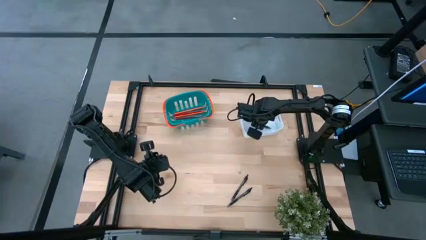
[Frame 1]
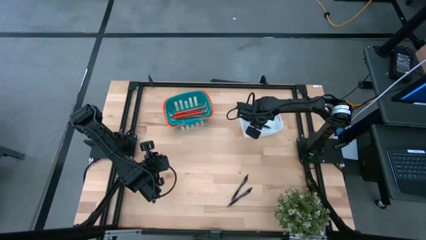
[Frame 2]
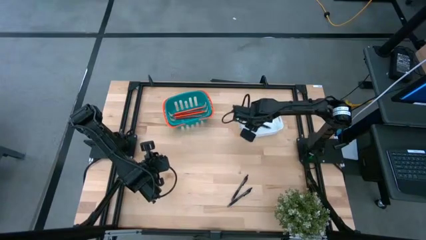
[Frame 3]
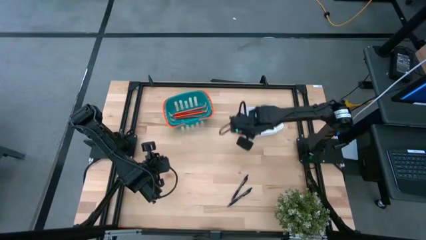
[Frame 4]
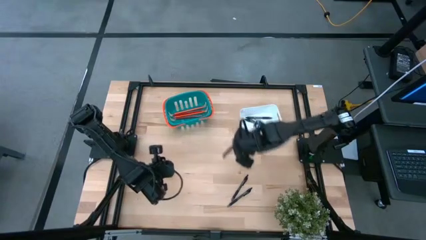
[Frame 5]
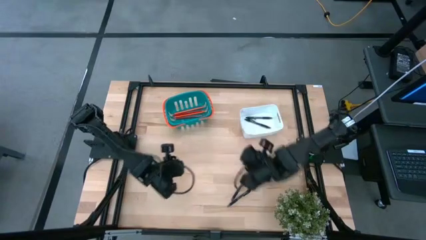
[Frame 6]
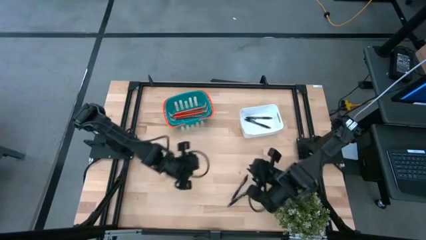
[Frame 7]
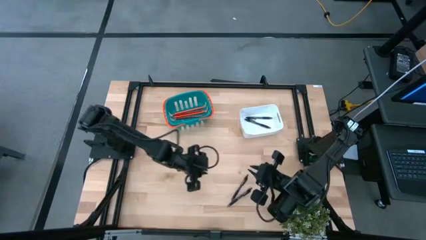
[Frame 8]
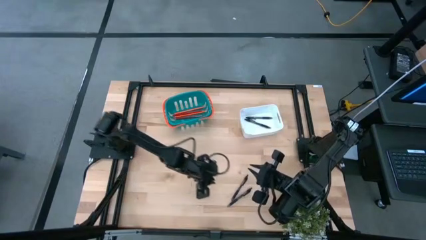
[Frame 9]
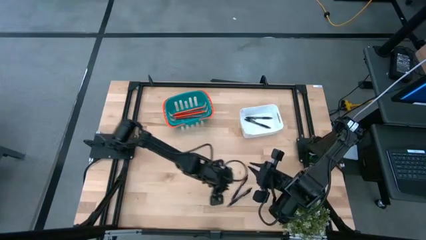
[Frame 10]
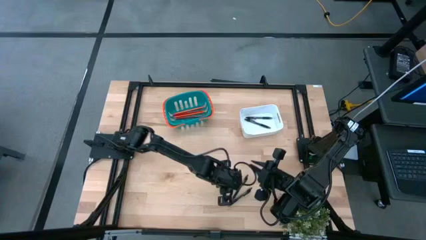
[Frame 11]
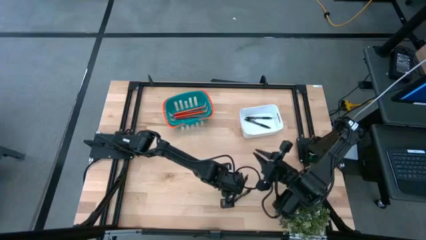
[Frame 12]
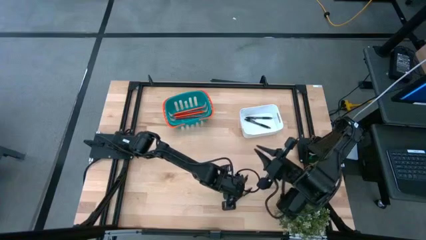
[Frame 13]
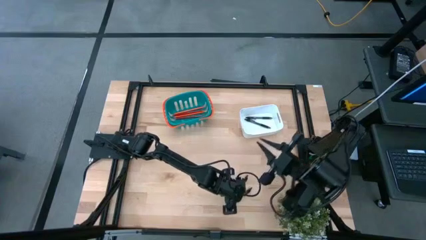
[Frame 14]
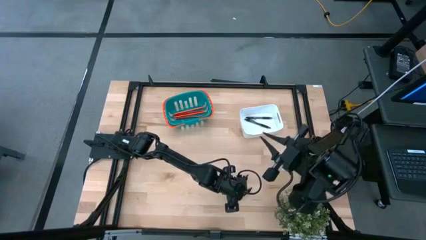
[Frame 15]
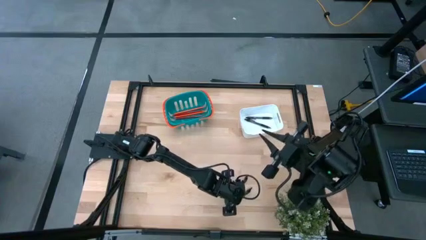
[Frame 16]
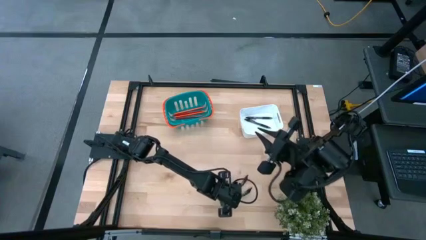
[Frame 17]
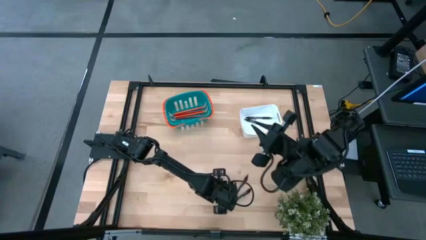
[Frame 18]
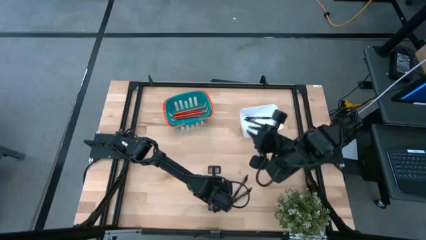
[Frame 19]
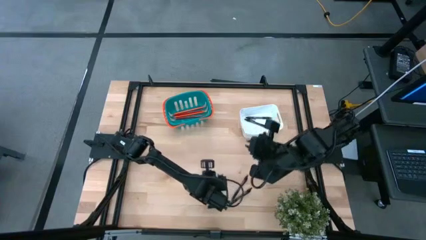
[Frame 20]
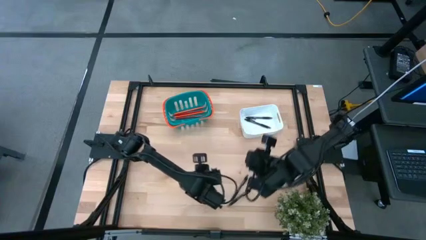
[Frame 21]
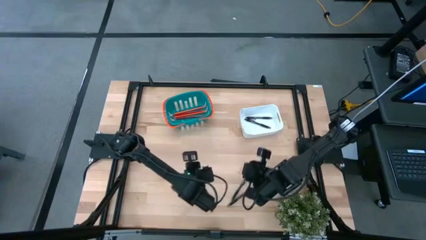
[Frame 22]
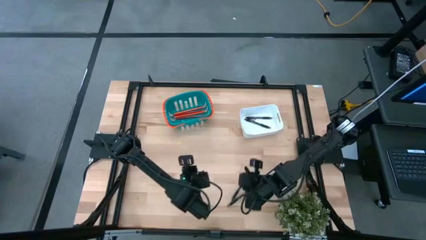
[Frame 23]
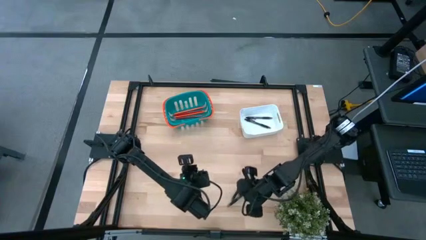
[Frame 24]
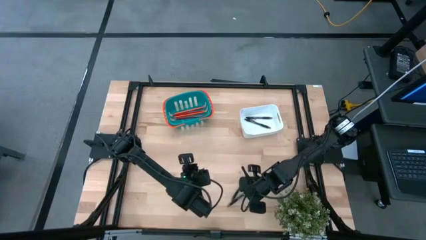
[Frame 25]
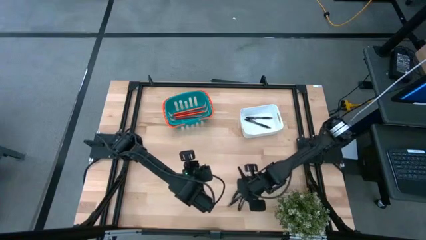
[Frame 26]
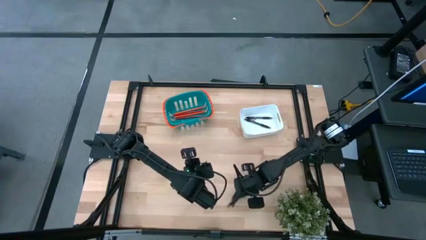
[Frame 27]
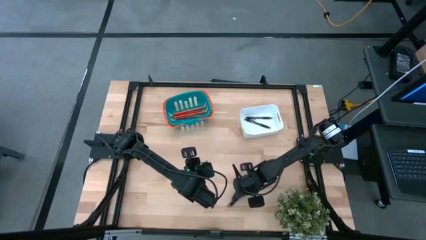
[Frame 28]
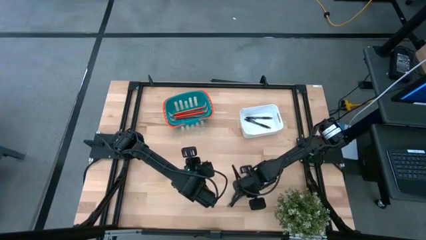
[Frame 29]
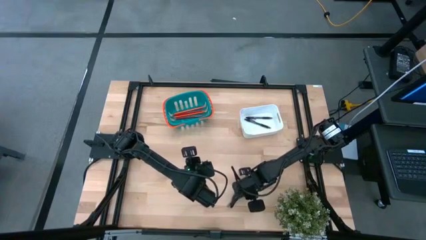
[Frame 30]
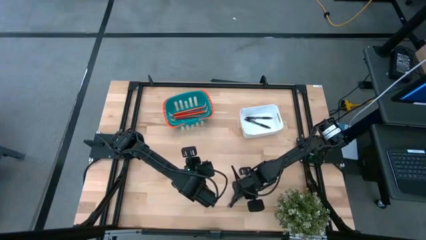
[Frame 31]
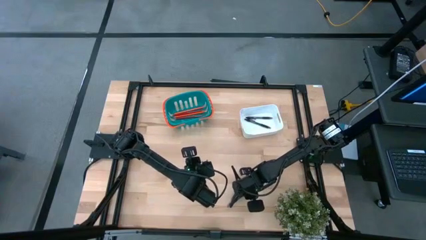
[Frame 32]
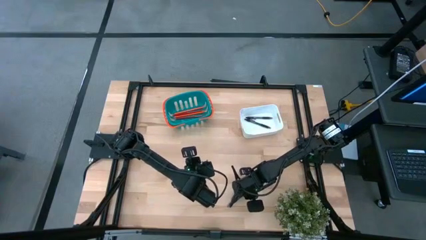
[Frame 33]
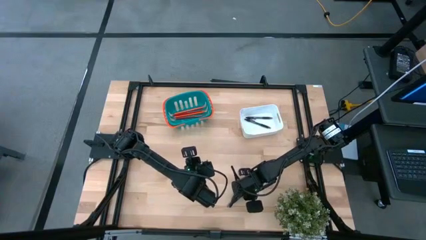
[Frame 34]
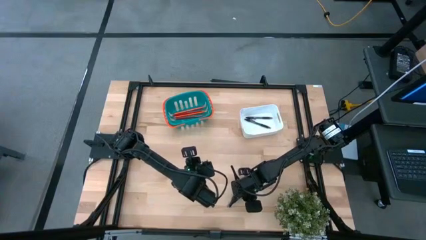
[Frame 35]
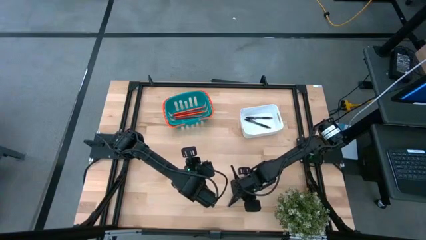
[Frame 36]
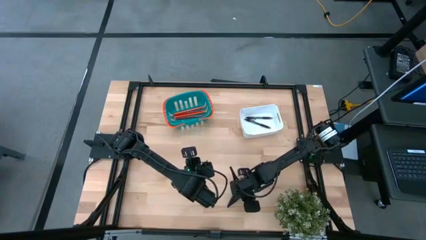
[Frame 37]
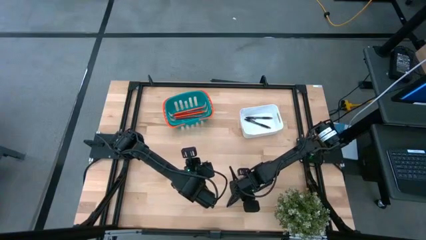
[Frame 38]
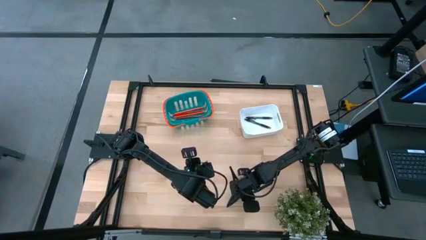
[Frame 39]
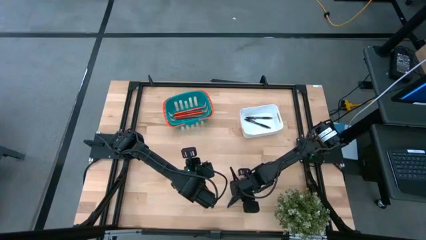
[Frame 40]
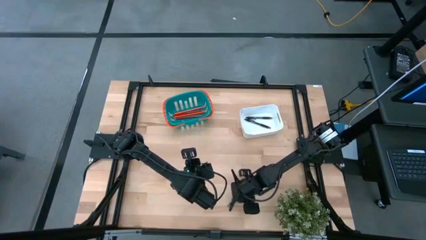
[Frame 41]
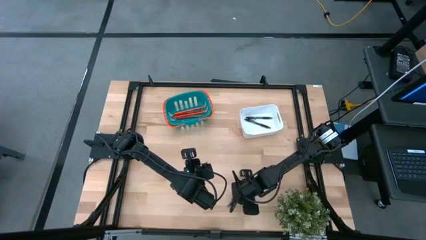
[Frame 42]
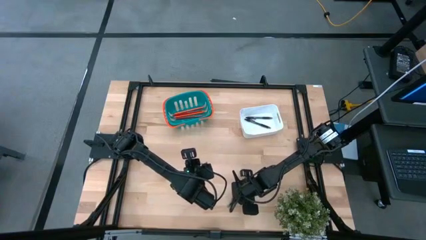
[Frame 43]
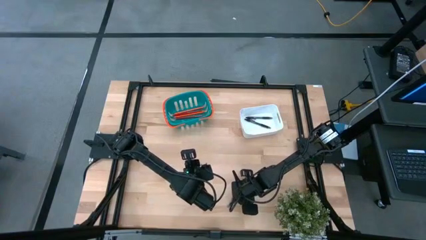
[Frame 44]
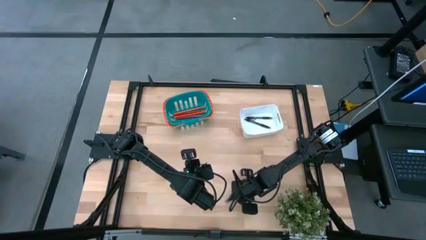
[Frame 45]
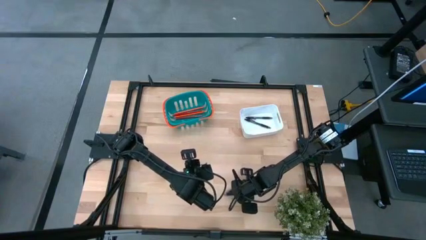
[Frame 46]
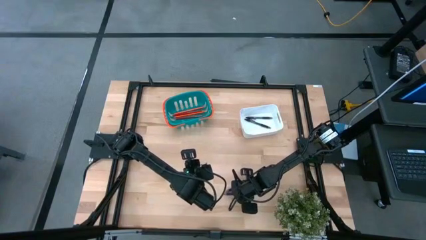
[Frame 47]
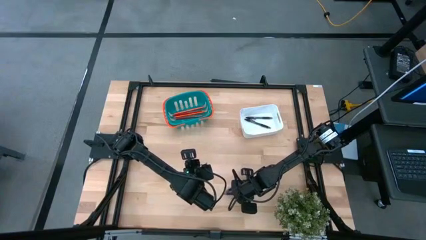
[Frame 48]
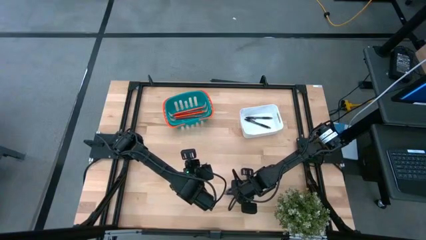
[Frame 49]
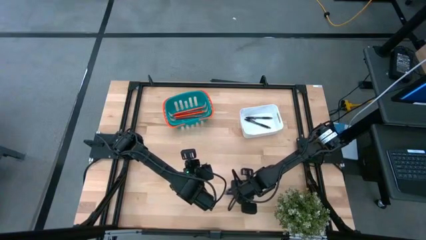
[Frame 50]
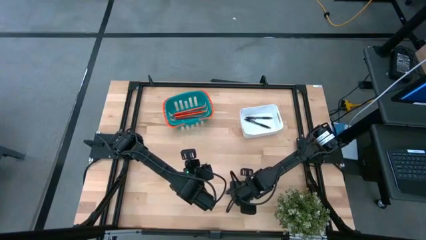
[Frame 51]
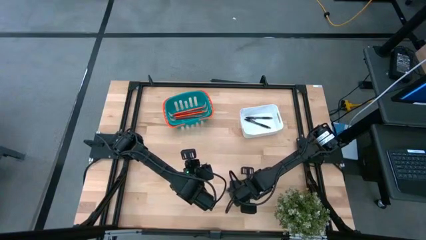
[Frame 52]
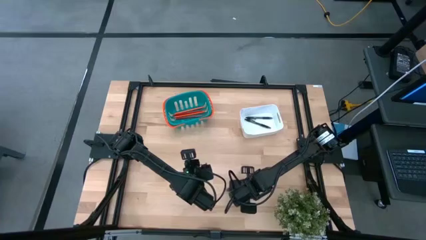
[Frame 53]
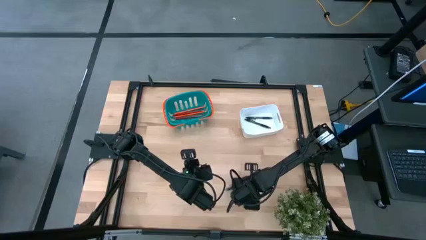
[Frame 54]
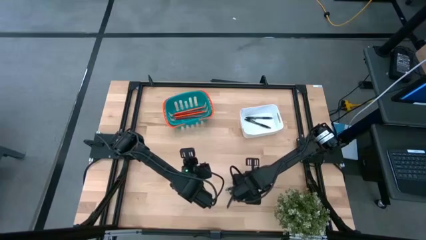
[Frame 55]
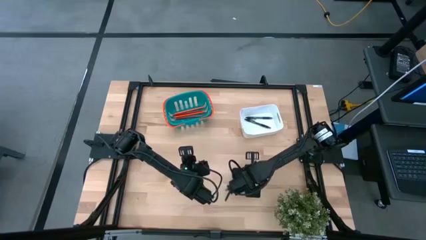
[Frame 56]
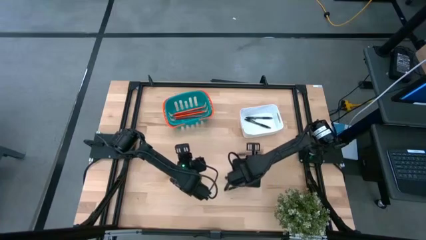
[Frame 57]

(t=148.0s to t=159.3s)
Task: Sort pens & pencils
Put the black pen into the white bin

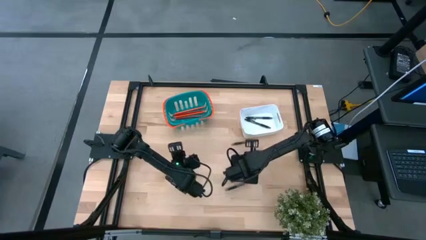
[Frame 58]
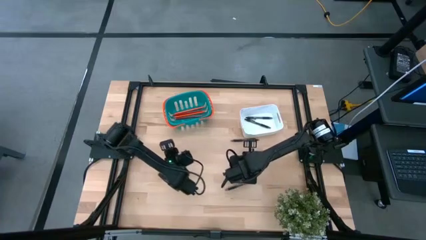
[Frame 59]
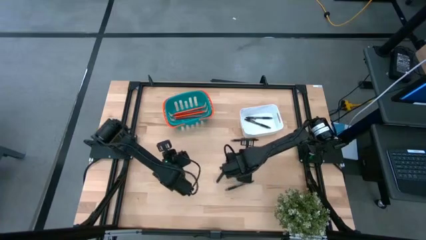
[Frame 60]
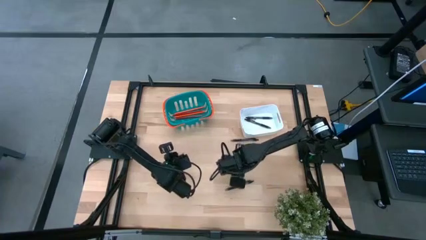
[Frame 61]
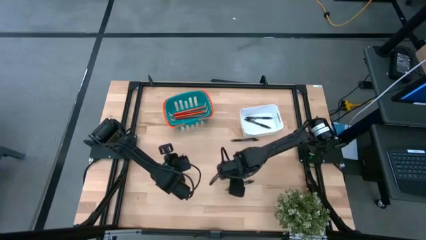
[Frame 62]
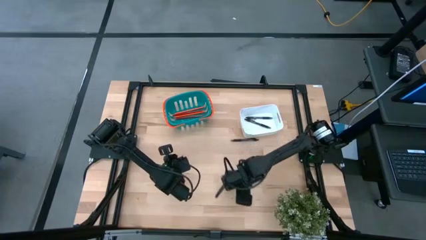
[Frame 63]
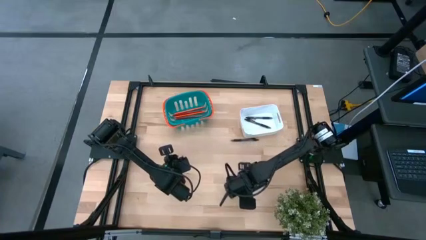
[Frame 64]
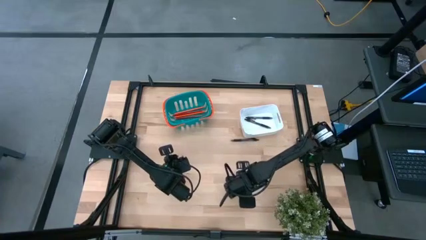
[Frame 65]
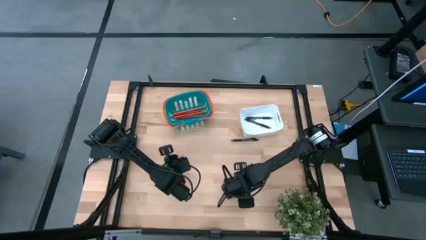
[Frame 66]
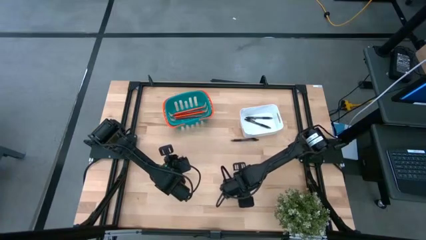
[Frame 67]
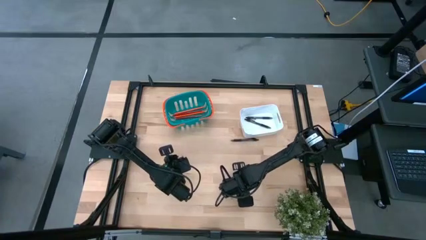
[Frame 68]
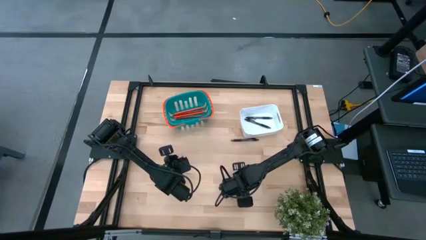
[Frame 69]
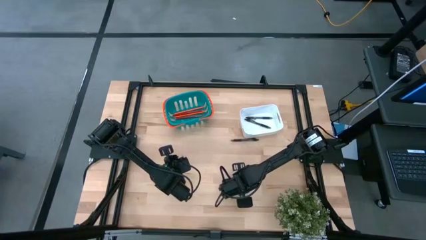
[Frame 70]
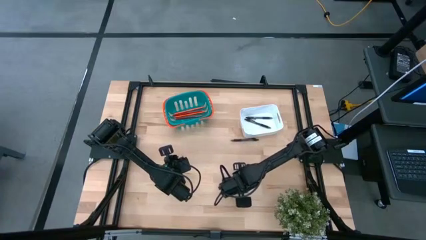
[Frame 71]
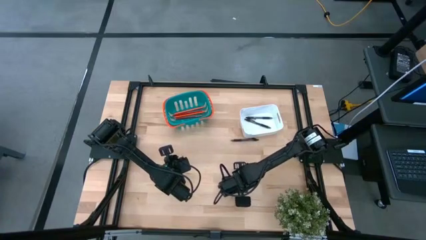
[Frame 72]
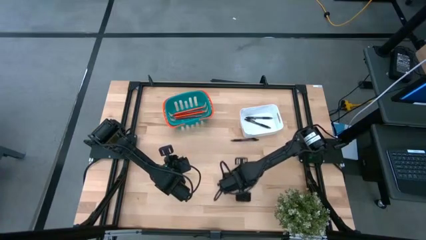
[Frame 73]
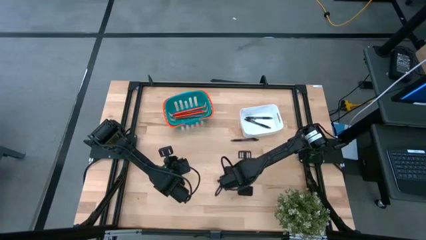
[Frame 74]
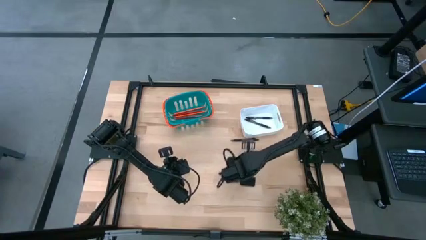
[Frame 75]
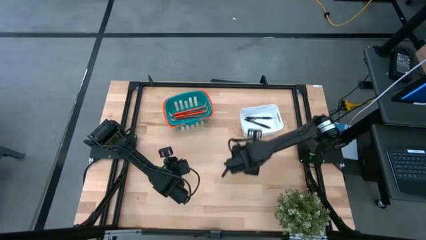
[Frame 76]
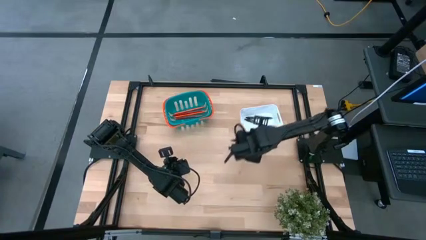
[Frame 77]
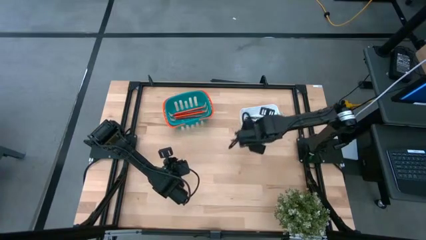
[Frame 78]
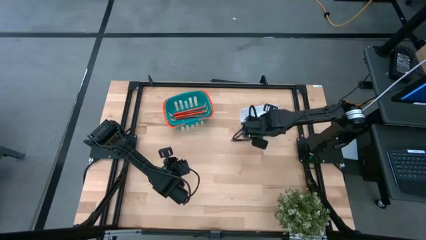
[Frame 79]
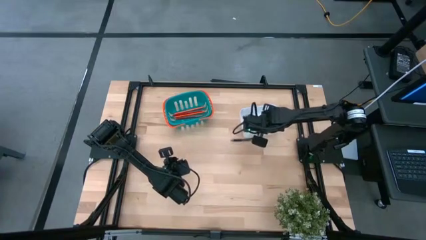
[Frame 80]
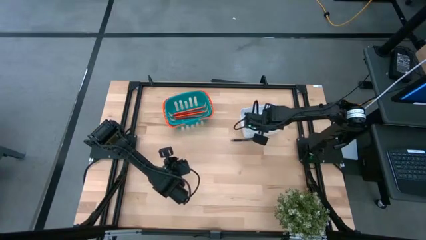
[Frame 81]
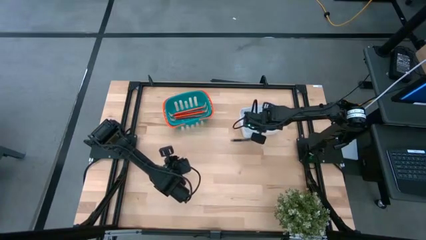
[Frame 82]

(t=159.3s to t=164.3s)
Put the black pen into the white bin
